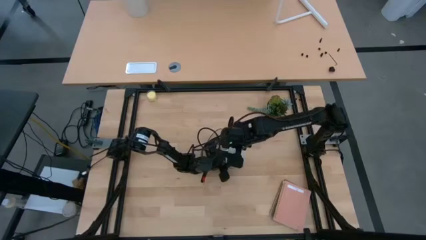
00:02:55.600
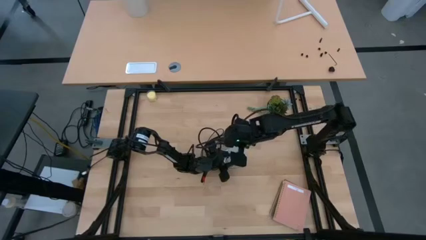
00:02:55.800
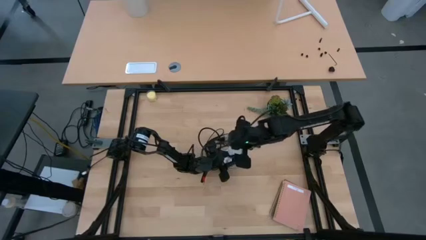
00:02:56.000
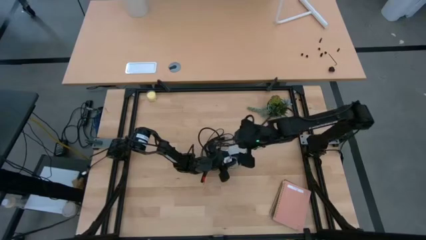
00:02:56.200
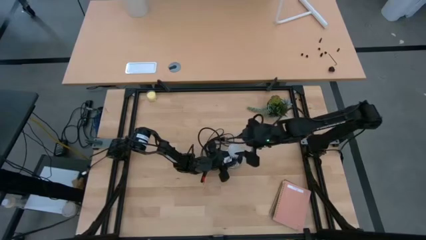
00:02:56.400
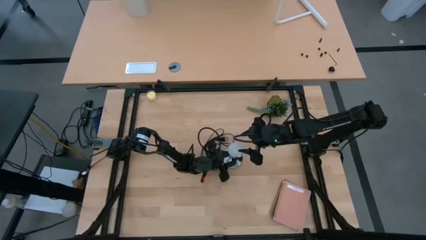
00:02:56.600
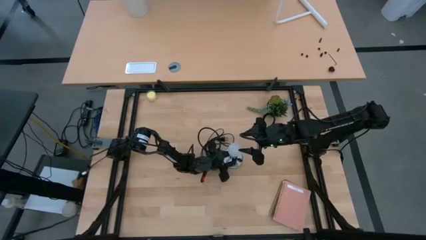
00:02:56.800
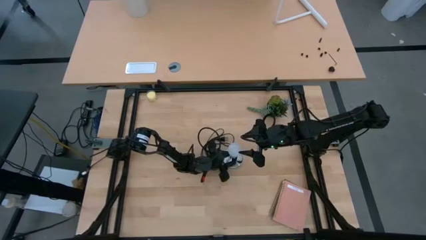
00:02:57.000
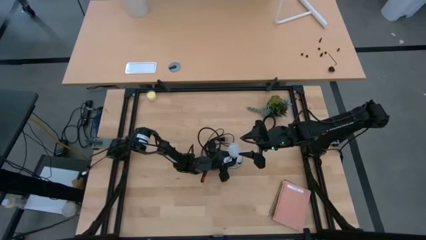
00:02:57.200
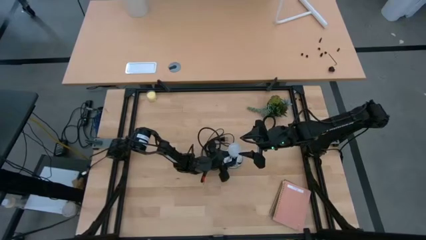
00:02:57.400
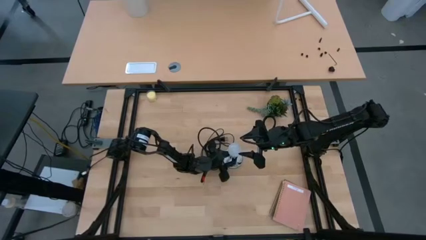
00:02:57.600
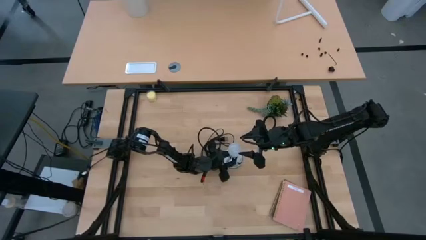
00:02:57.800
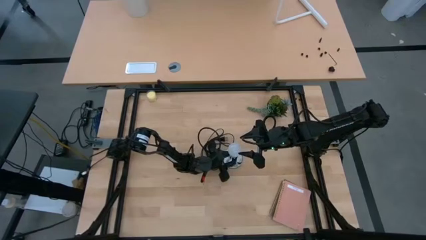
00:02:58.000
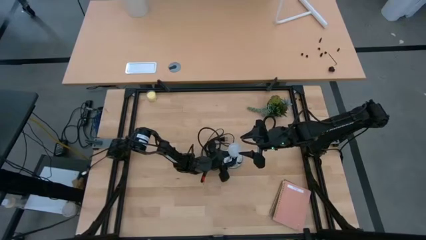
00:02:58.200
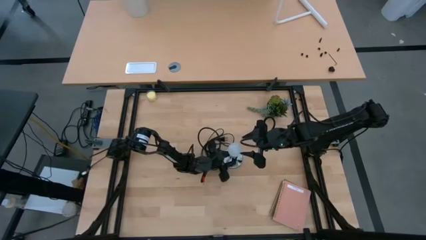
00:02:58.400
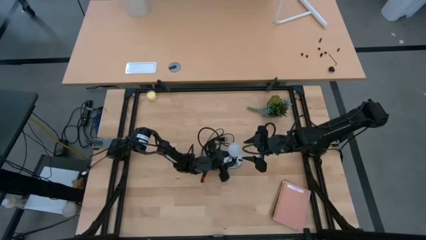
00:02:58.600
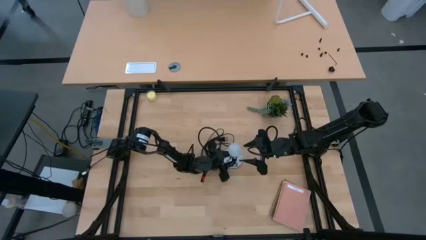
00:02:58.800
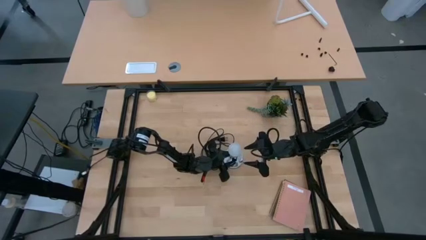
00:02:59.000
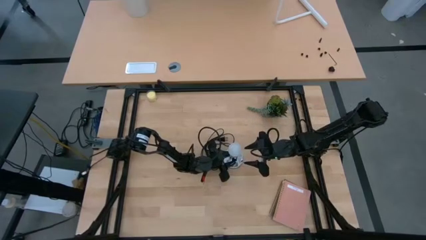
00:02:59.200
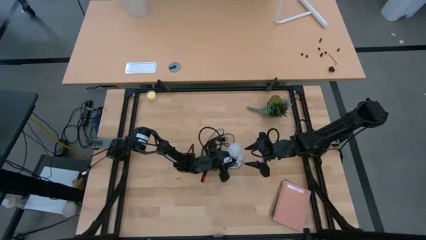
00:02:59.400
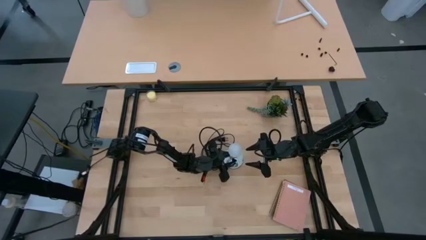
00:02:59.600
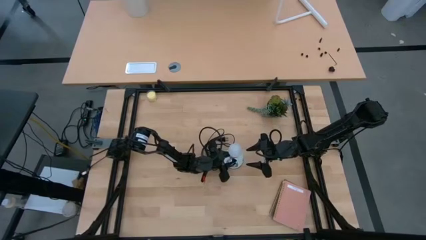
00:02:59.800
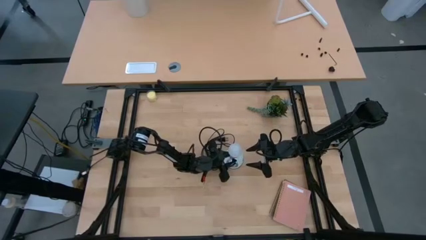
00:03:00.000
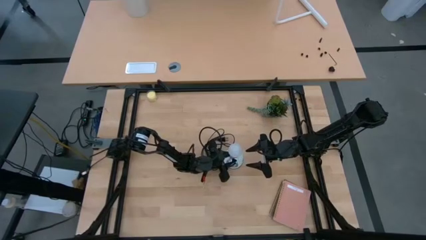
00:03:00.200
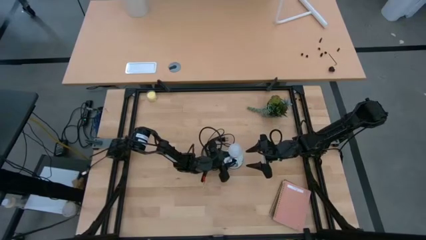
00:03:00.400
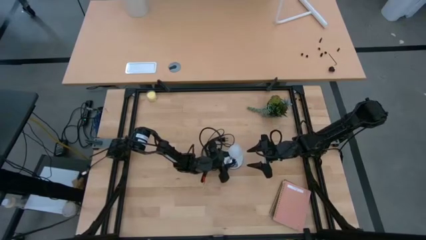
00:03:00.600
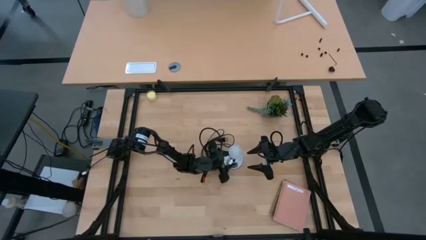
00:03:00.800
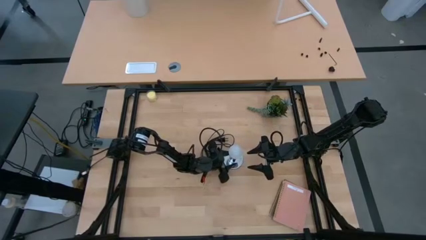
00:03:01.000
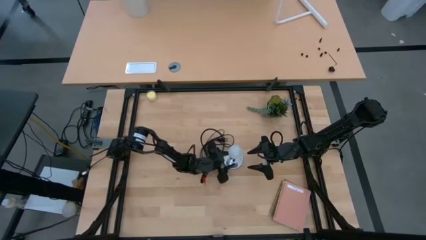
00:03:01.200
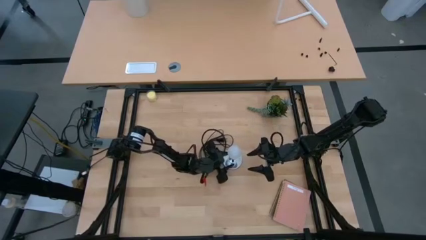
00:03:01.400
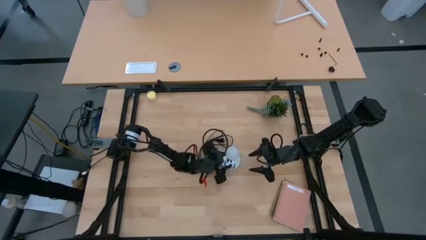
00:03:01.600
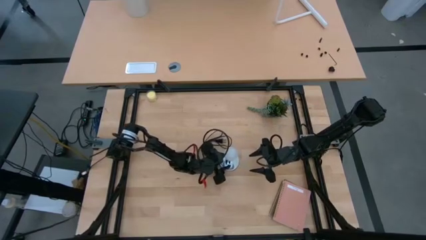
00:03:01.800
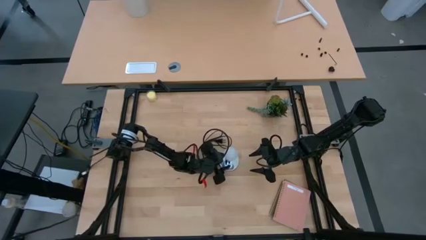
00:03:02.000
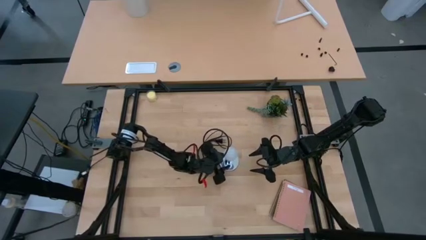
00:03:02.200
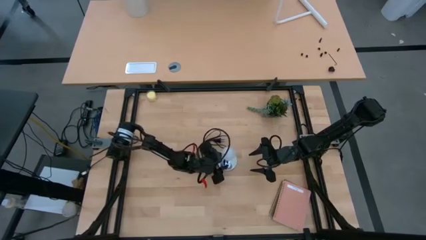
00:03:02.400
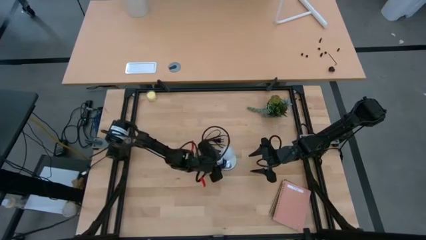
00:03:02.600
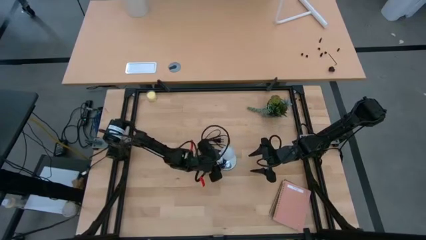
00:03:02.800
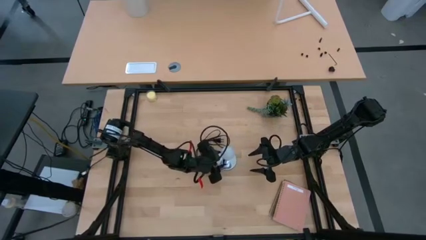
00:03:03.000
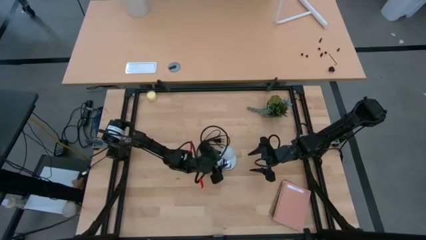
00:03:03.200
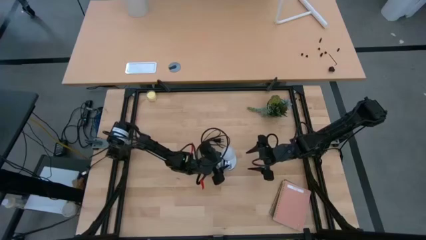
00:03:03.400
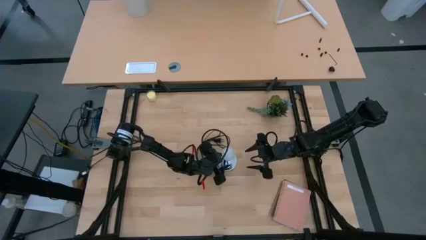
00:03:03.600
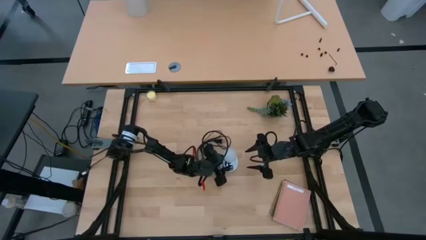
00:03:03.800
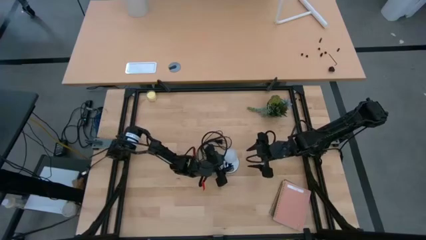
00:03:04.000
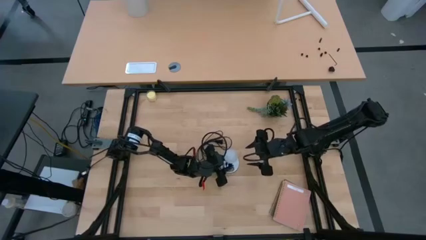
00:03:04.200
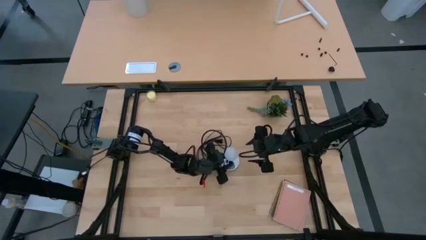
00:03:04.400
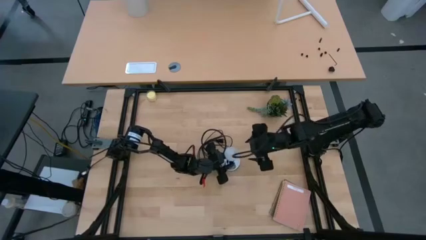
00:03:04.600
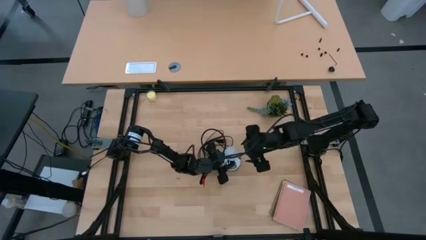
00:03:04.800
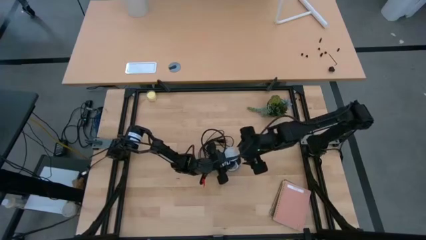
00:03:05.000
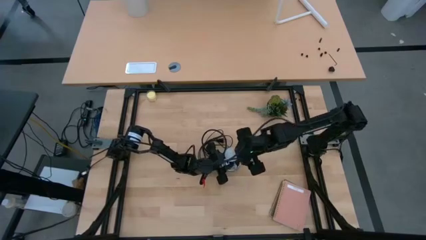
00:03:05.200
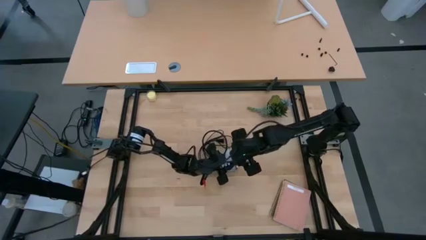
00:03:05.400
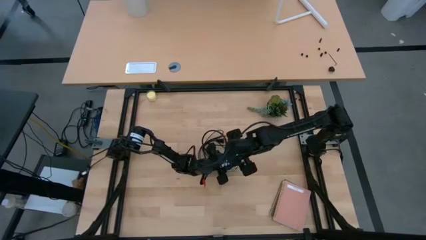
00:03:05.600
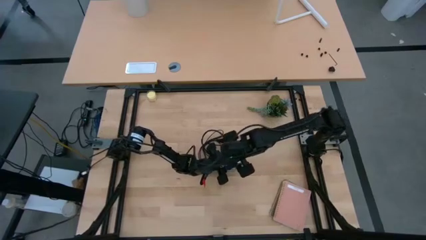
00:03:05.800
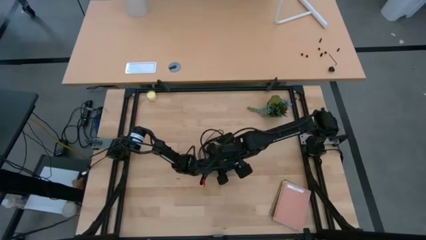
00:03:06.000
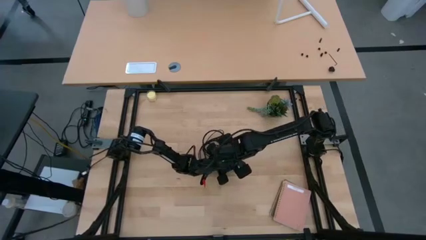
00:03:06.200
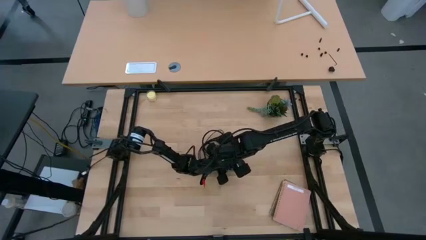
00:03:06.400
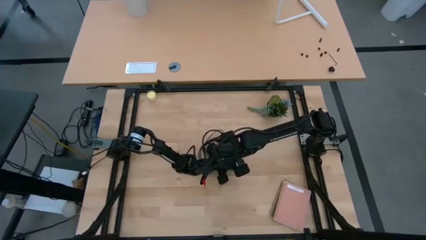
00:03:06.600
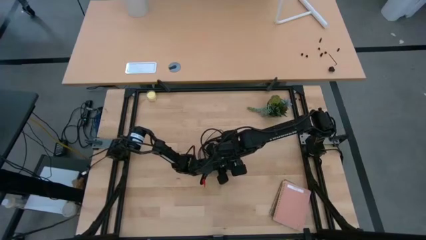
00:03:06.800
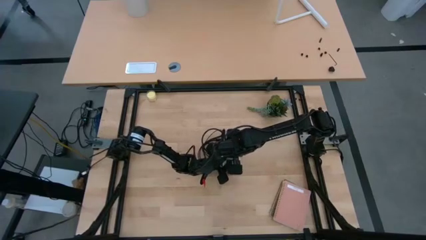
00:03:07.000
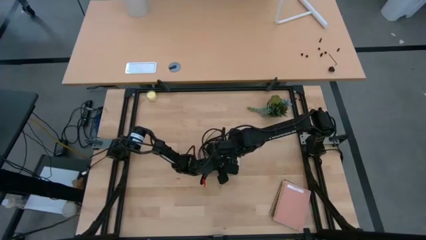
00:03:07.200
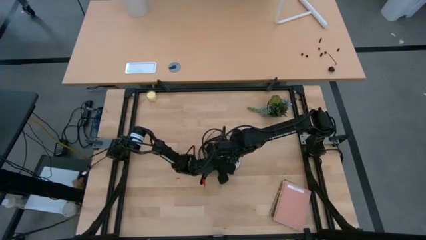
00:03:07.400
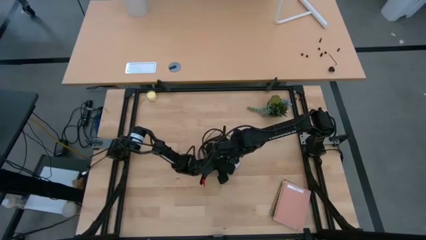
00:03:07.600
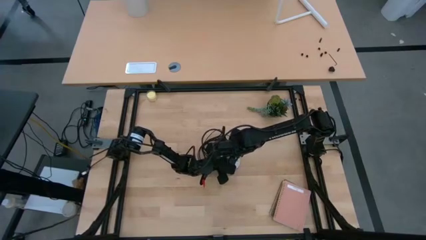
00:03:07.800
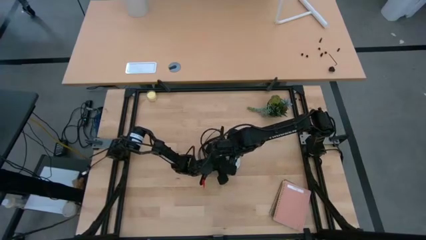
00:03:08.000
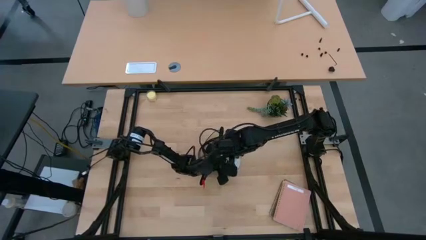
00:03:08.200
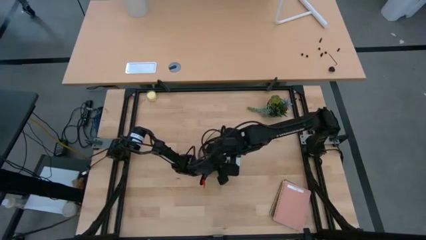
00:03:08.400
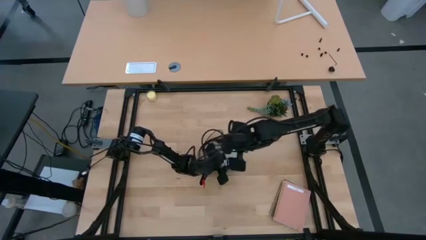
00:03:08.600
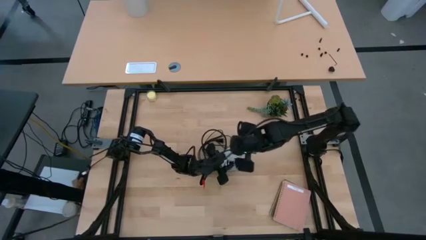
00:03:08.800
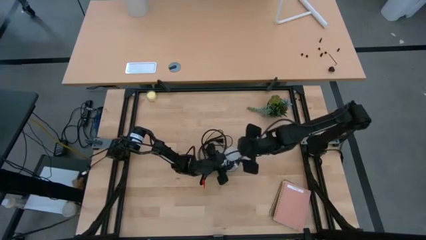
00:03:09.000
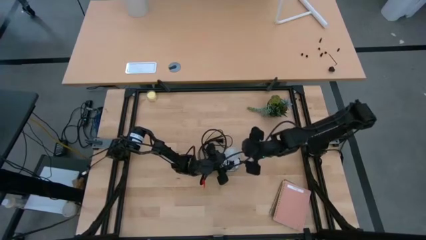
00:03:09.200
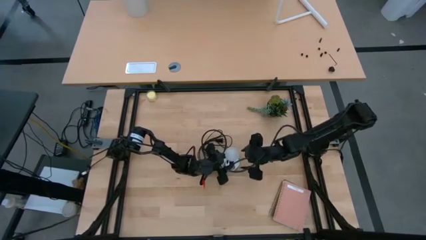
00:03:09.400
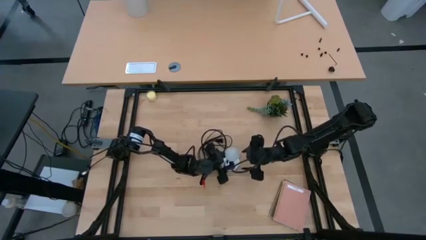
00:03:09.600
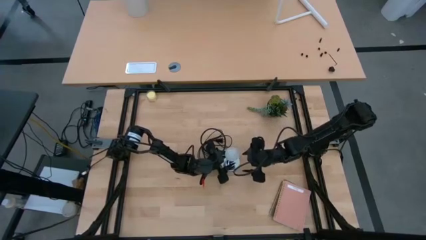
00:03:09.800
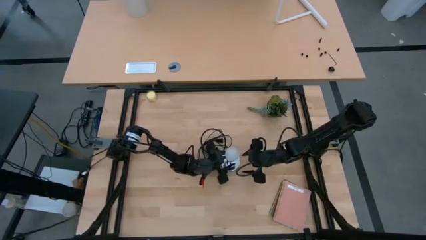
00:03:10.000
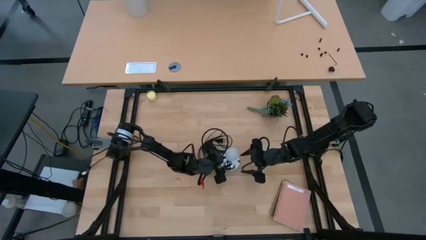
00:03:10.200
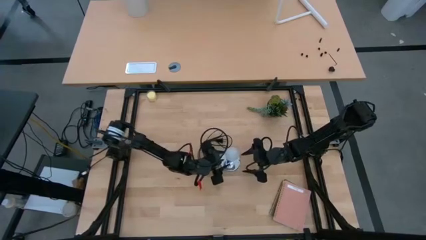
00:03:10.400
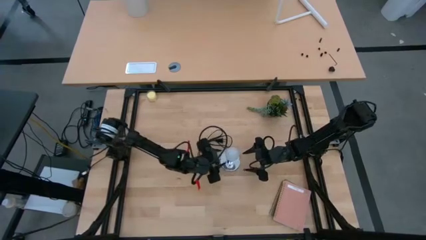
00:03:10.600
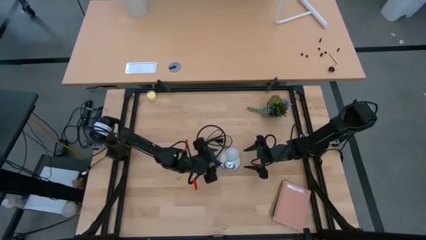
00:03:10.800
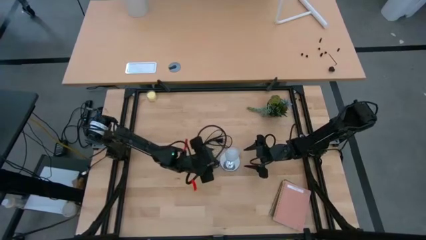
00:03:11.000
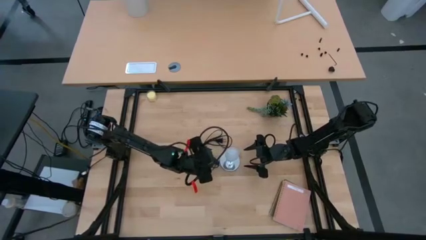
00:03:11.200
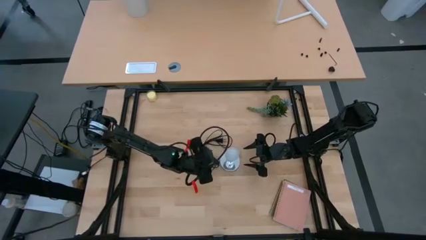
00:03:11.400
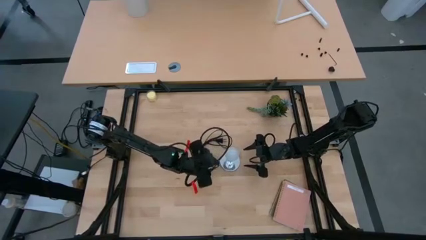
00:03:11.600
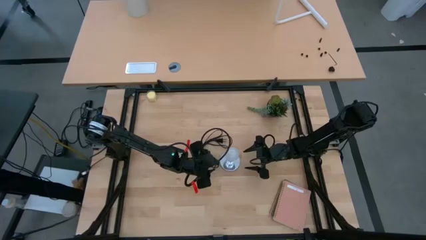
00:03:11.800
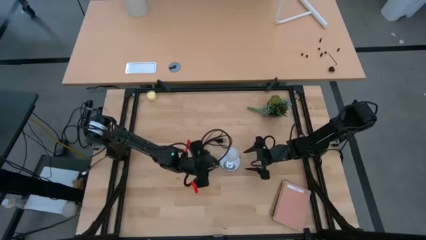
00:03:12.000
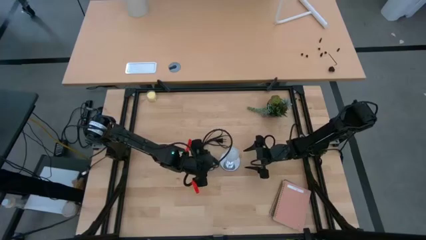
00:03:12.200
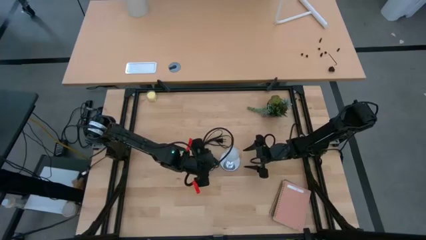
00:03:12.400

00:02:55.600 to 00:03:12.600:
Task: Screw lightbulb
Remove the white lightbulb from the metallic lamp
